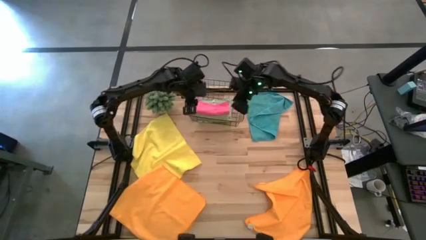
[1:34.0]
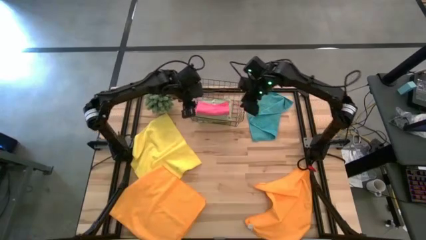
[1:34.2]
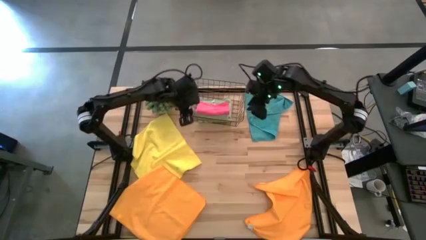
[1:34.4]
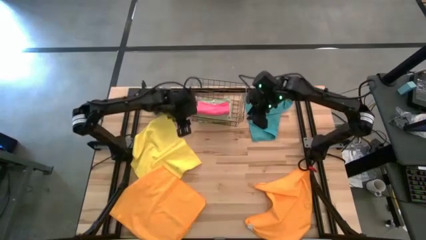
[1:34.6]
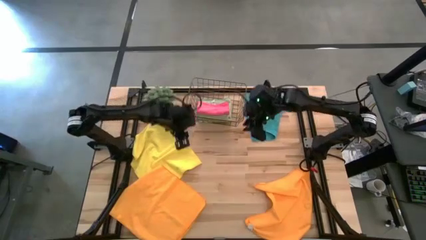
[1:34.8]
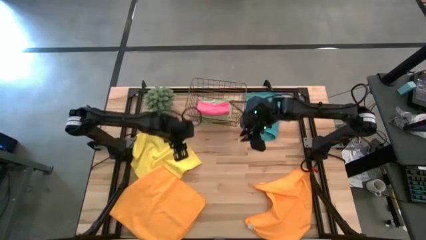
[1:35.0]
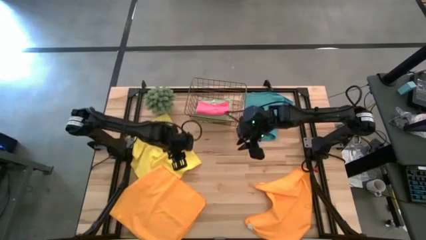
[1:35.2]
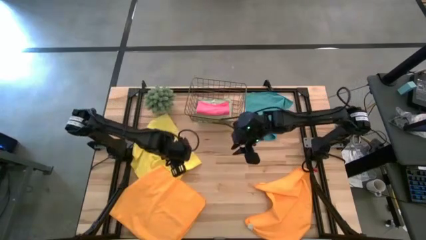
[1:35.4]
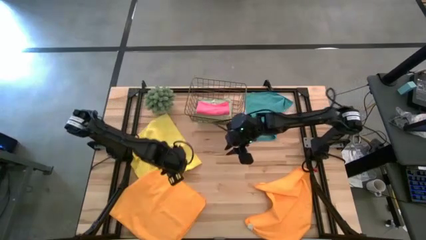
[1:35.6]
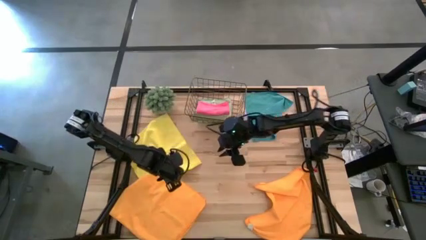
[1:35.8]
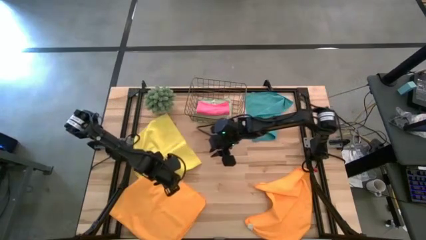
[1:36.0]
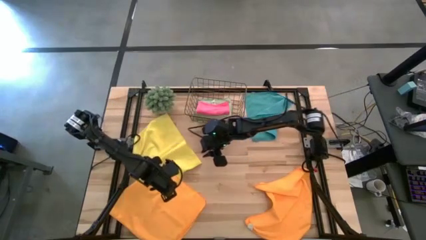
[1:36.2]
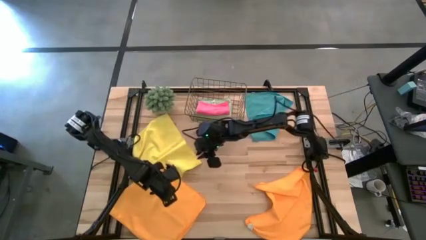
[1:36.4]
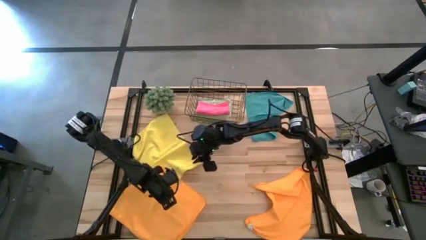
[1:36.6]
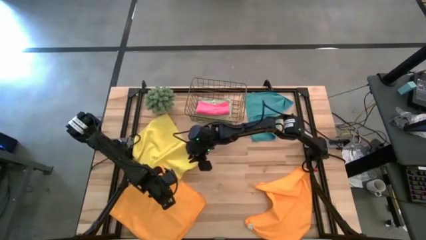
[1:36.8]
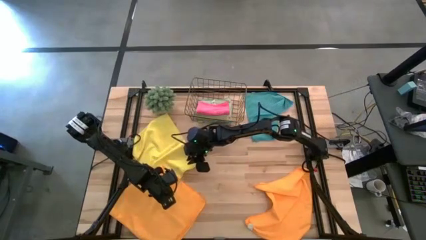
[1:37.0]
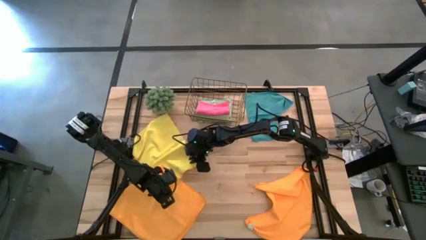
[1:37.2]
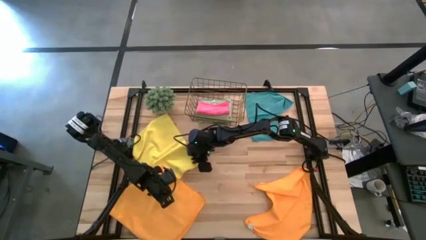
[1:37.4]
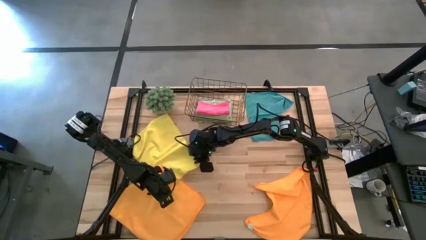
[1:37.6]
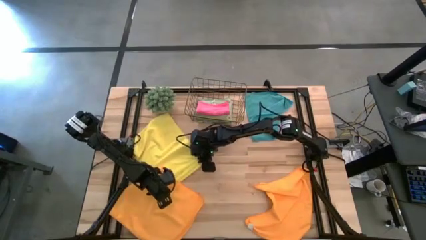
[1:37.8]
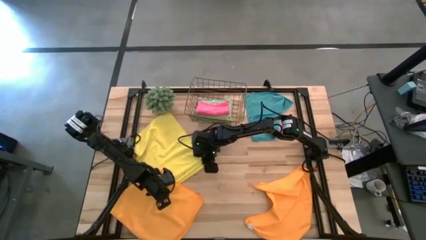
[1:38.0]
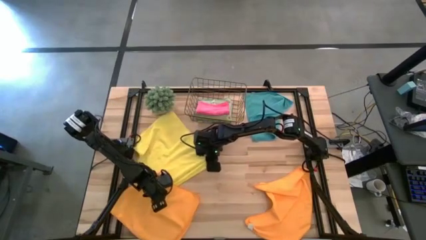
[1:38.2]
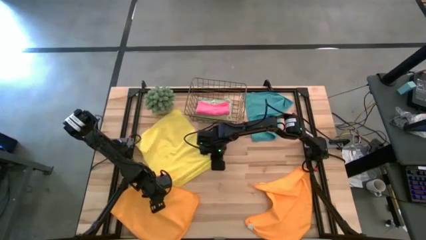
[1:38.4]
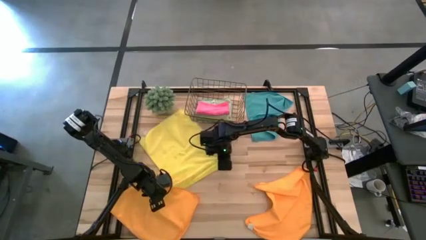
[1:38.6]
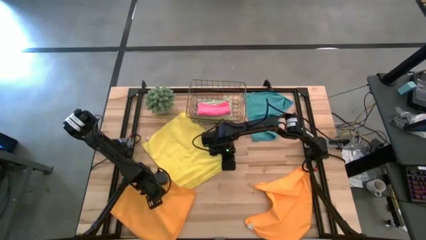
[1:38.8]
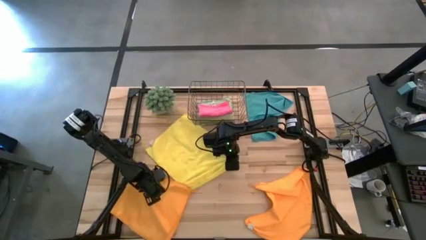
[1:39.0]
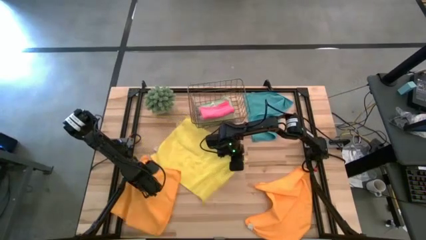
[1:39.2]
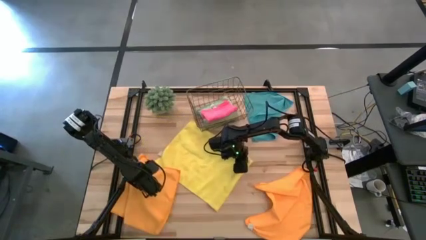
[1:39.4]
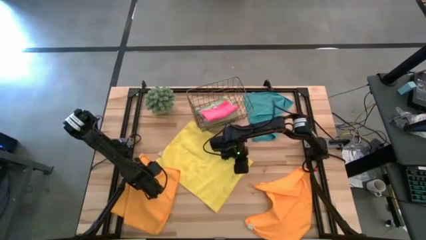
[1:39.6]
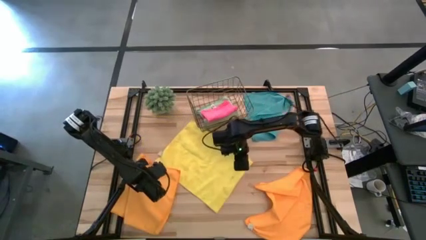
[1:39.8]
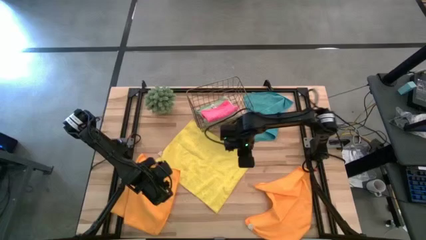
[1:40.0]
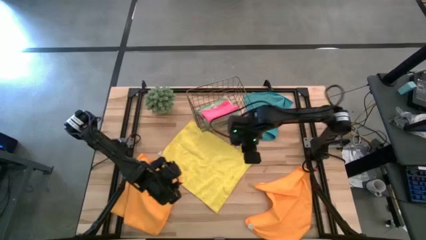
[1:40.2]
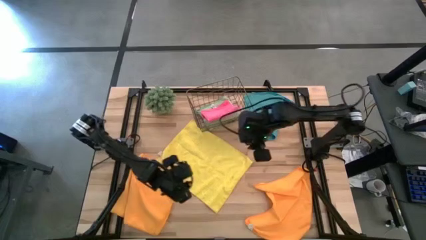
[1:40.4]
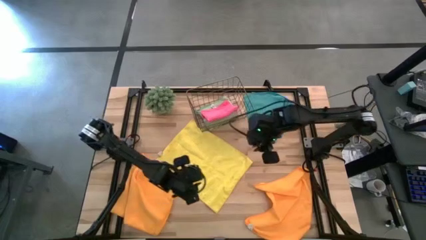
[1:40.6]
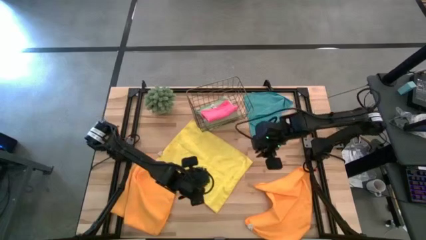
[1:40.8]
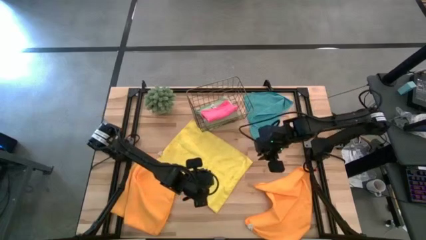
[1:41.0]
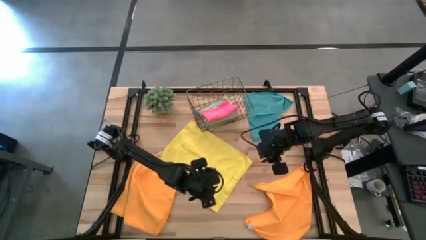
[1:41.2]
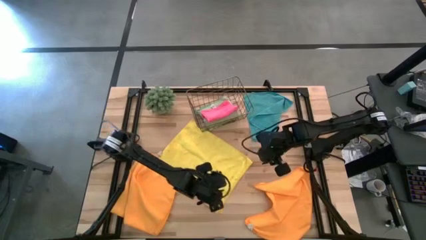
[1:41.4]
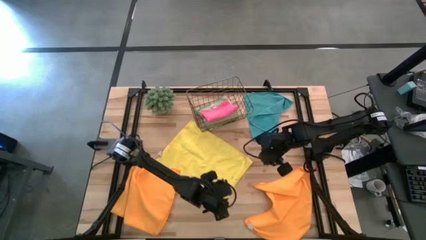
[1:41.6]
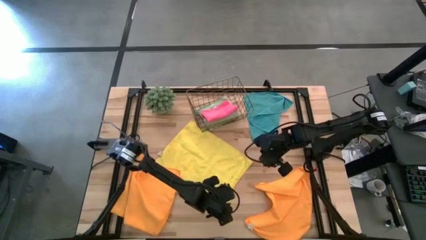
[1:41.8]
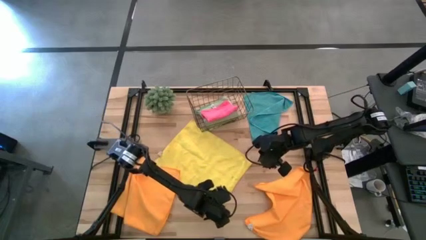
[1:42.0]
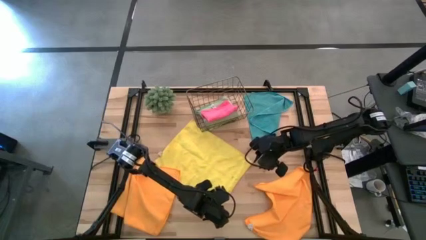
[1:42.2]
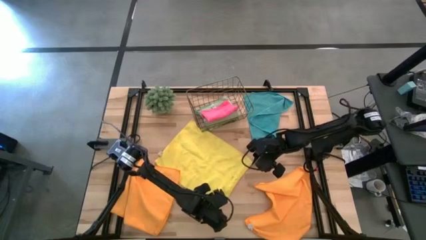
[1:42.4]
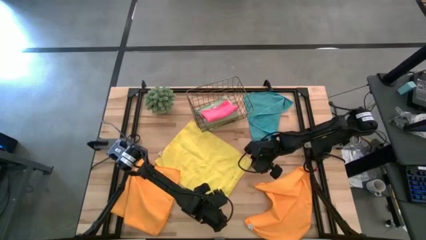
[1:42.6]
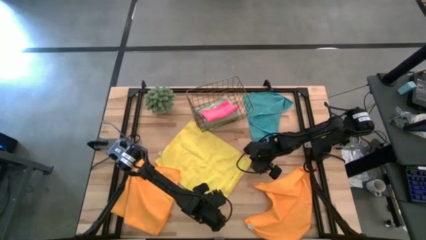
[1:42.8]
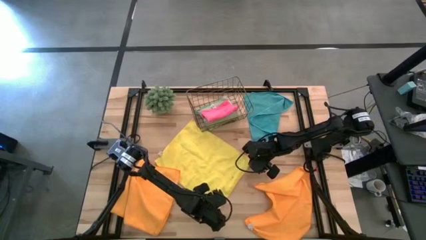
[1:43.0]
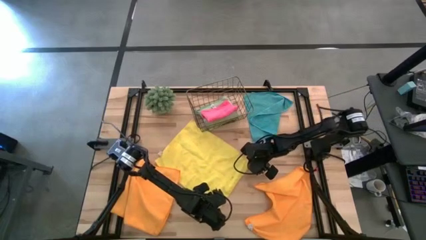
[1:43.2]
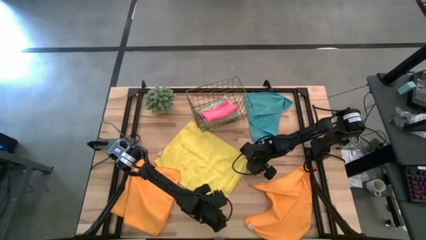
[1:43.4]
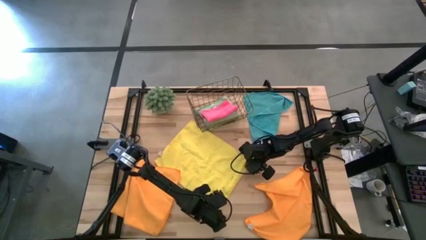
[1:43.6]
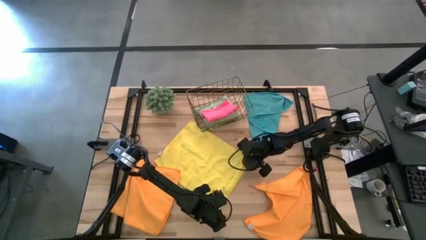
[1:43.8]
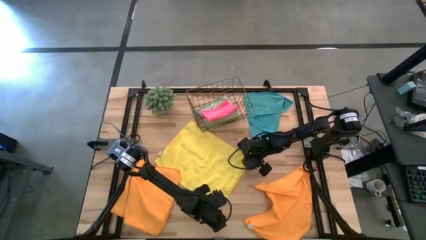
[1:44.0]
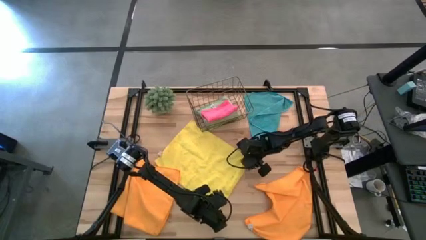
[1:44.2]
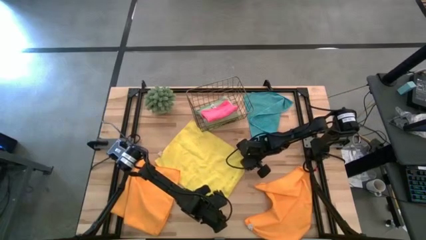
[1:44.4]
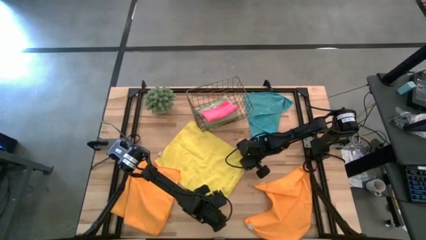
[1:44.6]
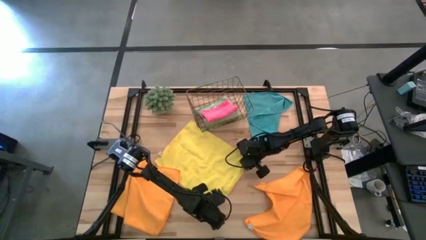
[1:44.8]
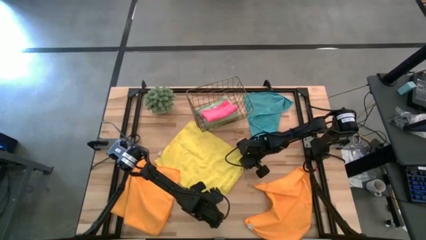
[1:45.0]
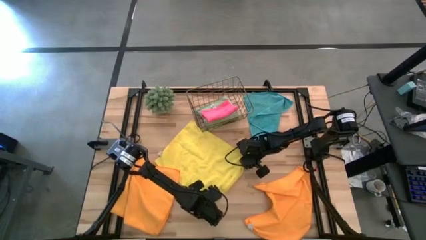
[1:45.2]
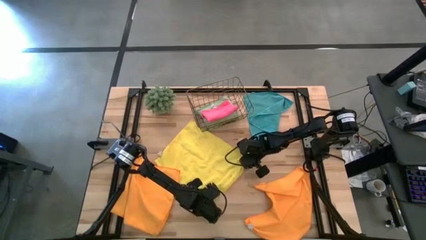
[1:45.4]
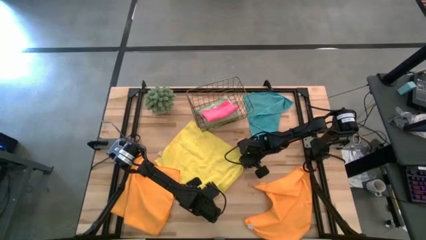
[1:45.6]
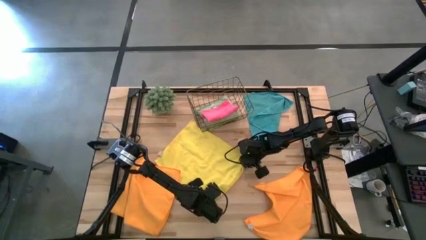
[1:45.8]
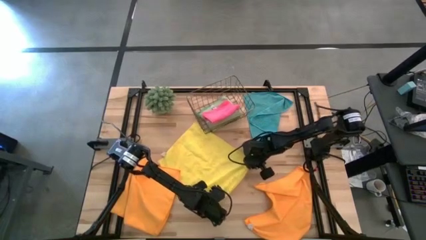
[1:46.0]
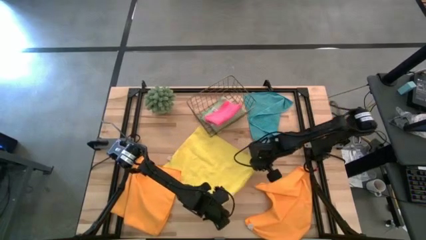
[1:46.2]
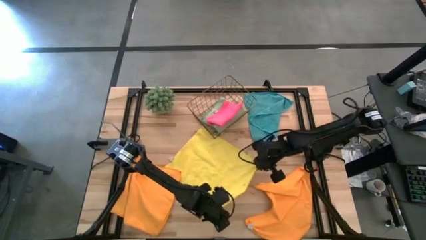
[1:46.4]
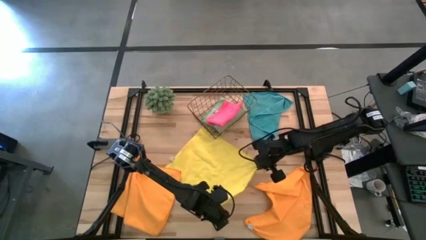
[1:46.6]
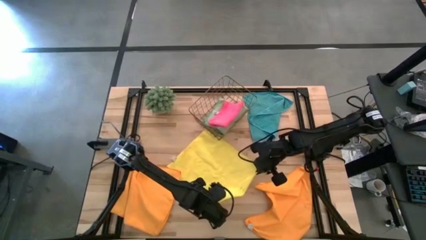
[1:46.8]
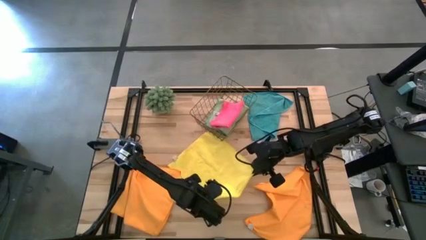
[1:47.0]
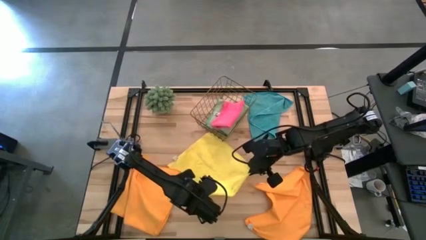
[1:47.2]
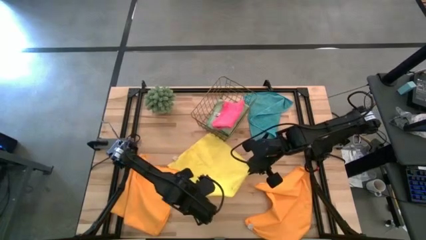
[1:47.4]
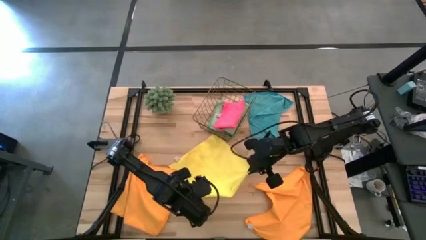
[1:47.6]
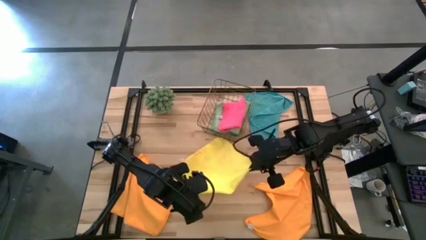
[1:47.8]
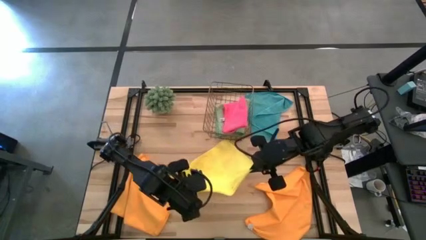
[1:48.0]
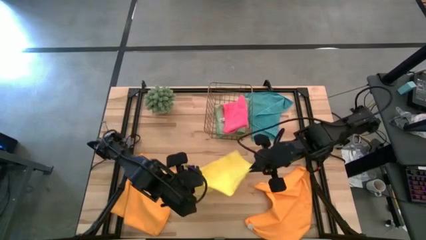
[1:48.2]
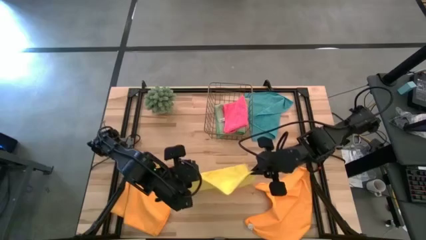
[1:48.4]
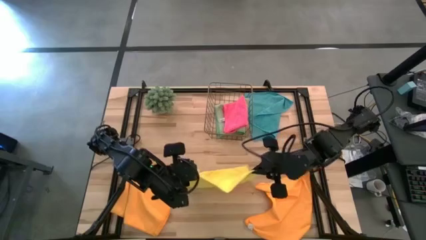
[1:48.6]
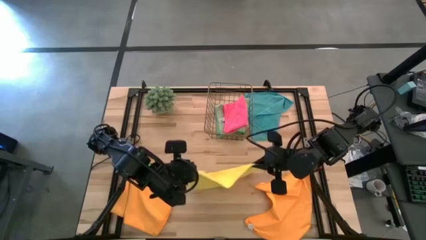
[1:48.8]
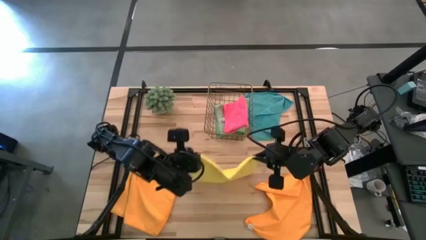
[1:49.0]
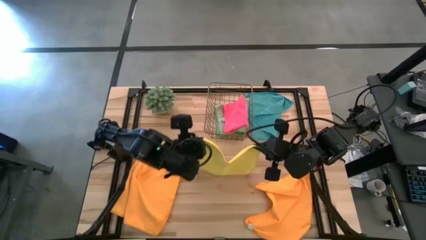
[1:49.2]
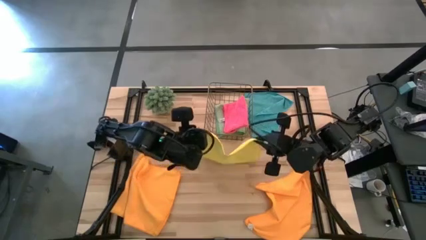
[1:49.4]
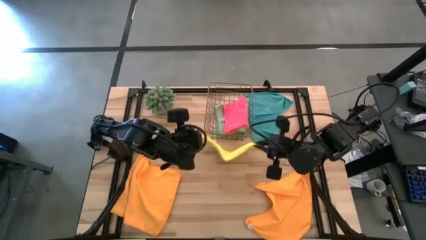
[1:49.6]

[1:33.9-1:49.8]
Task: Fold microfiber towels
Fold the yellow towel
